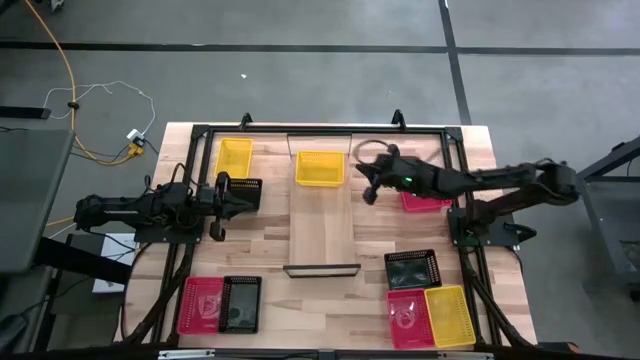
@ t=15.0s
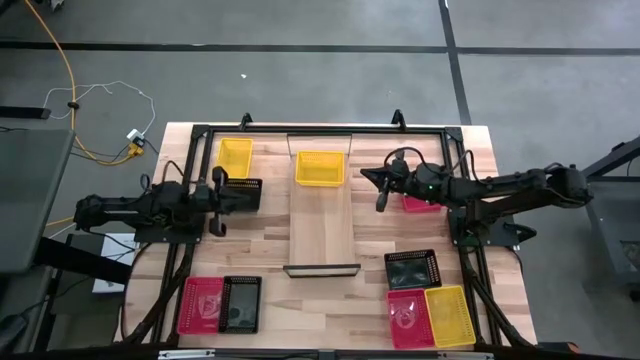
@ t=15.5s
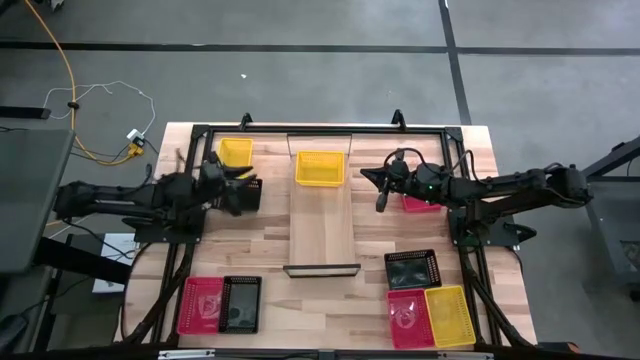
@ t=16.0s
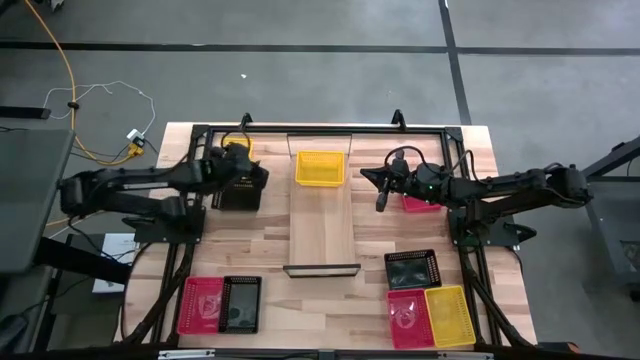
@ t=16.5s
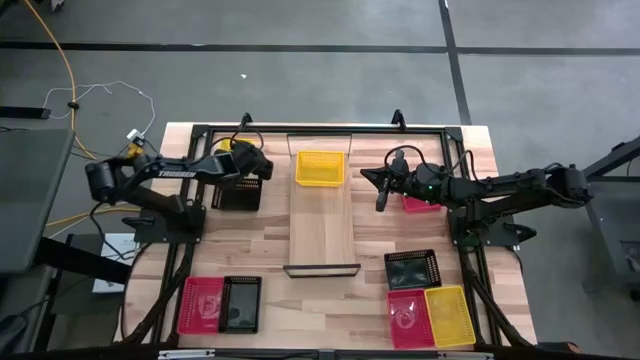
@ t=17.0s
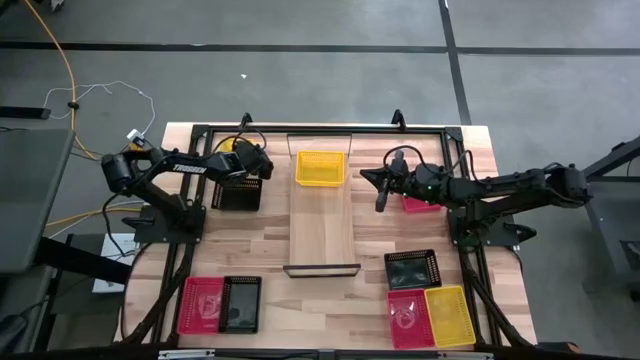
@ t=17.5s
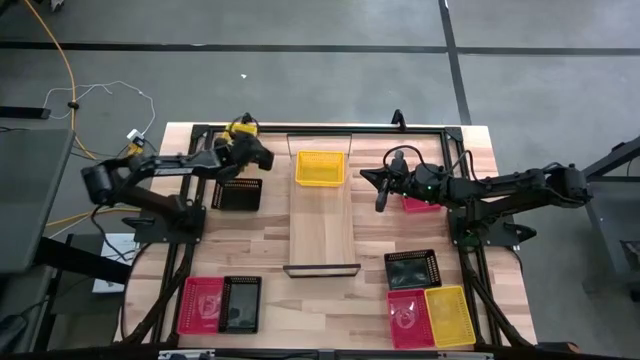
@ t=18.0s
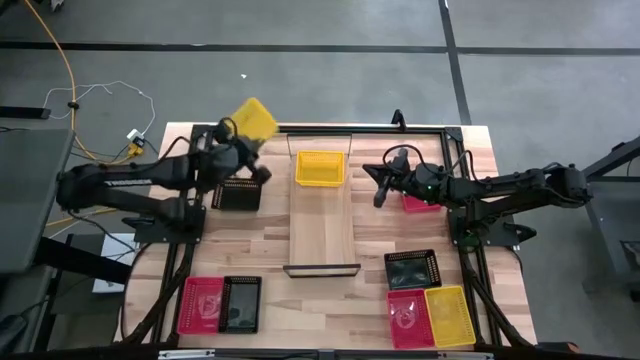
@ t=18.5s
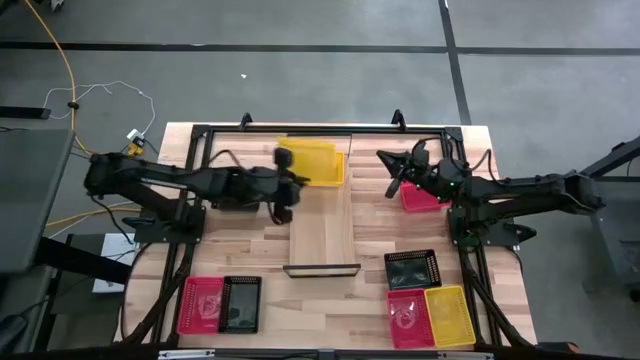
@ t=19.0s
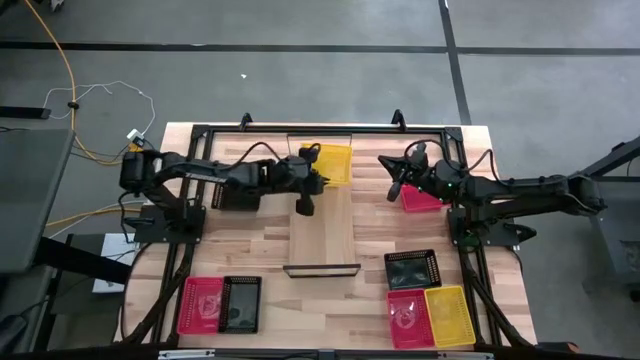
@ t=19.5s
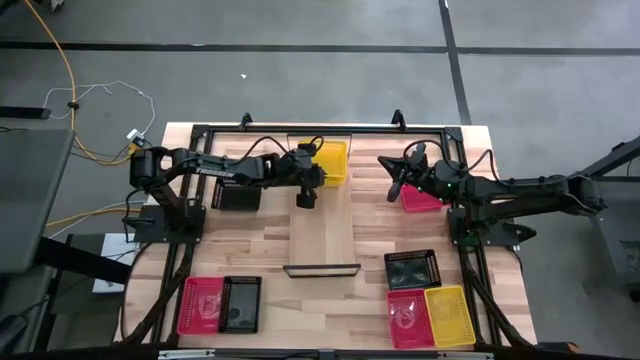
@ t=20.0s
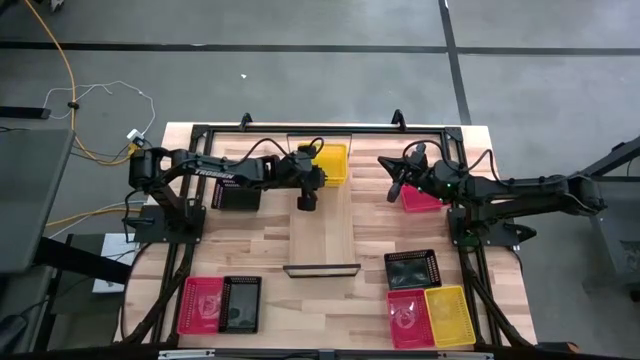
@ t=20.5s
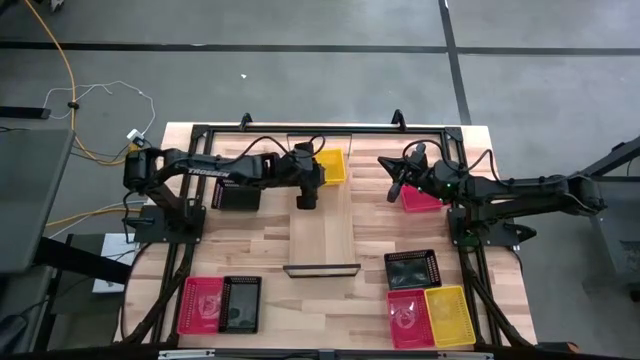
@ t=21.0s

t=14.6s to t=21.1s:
Task: Stack baskets on shelf by color
Stack the top yellow bin on the yellow bin on the shelf

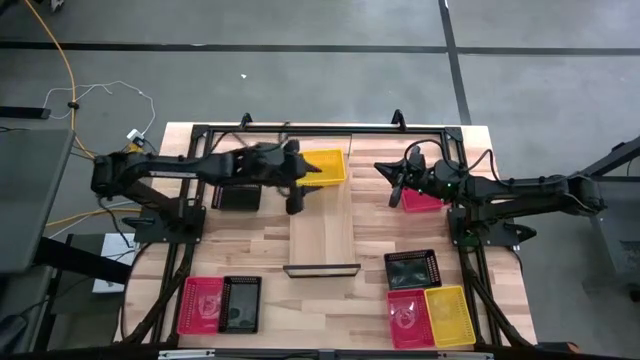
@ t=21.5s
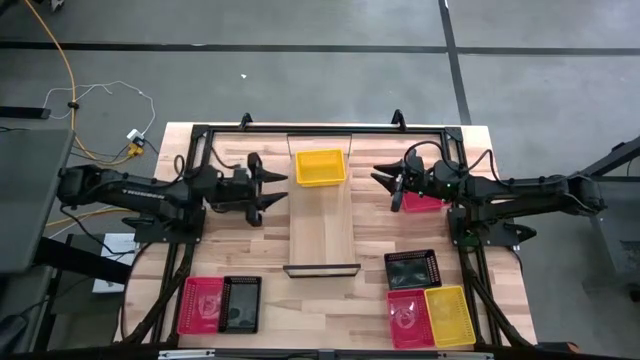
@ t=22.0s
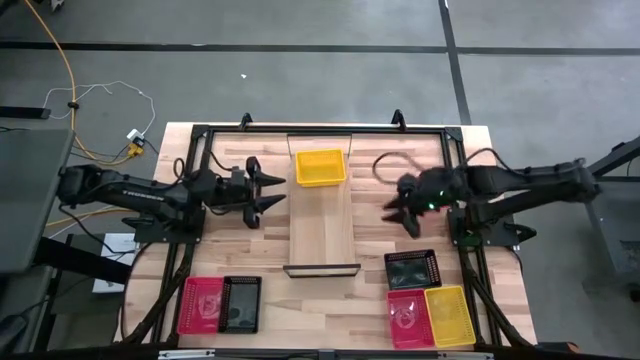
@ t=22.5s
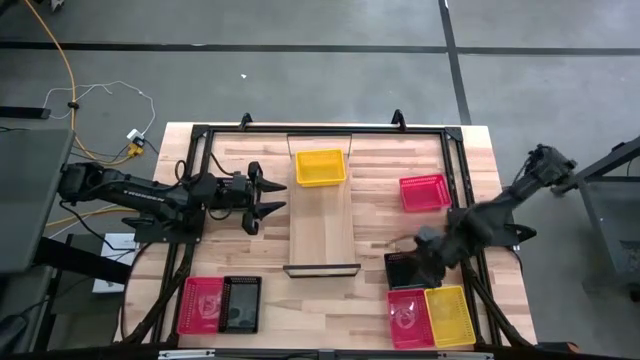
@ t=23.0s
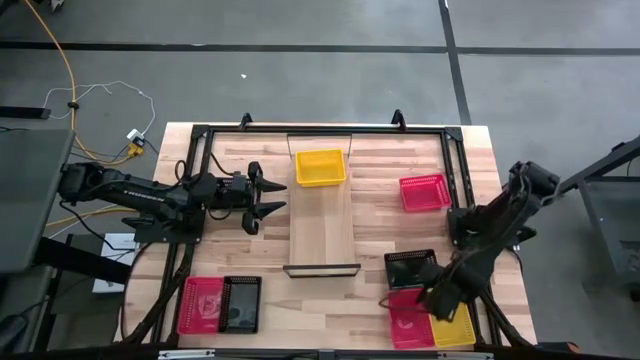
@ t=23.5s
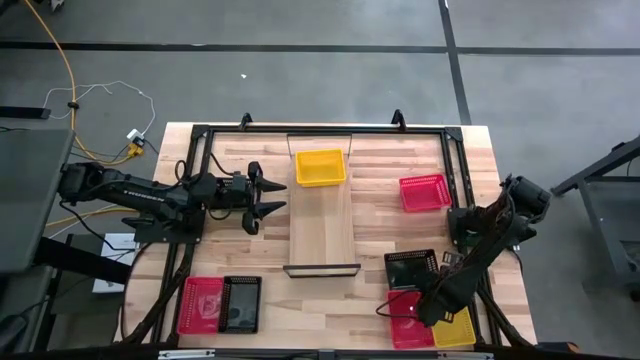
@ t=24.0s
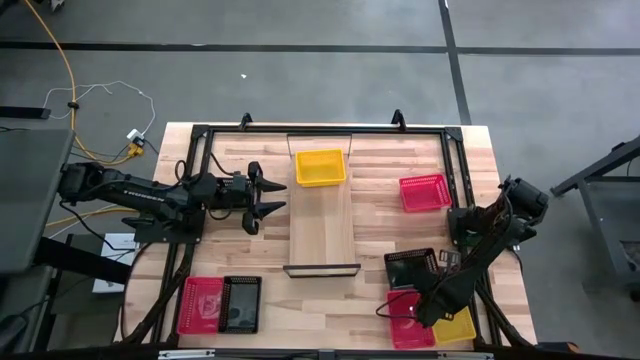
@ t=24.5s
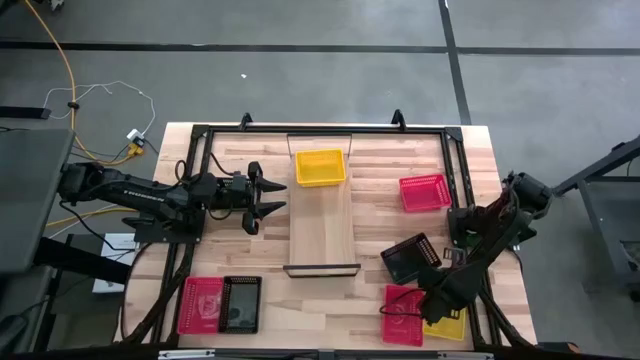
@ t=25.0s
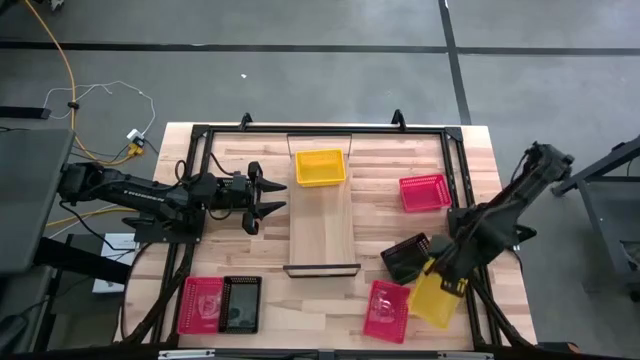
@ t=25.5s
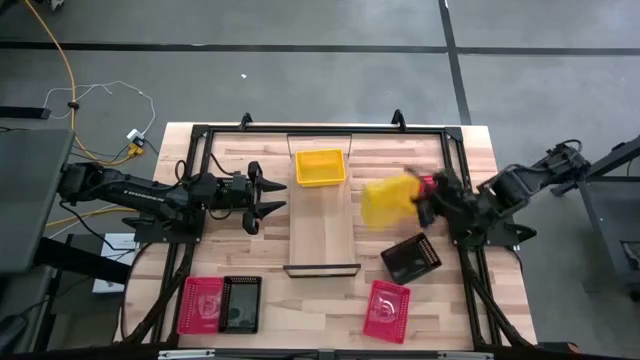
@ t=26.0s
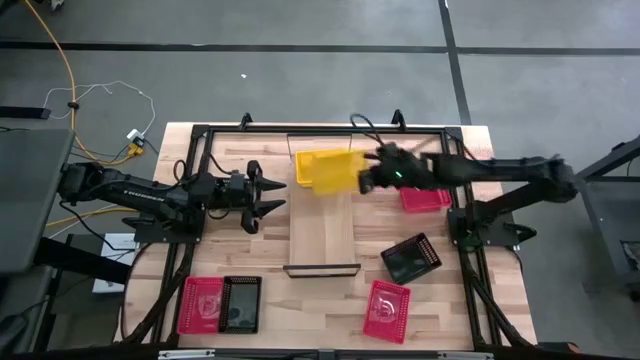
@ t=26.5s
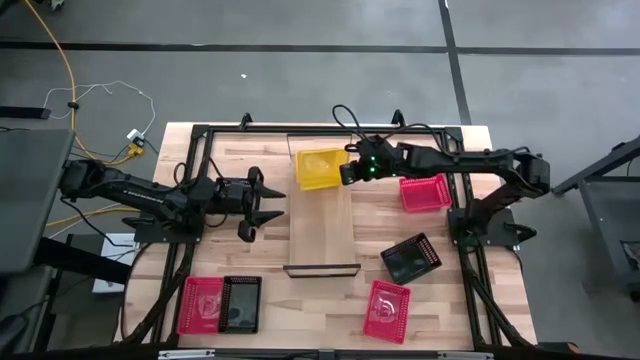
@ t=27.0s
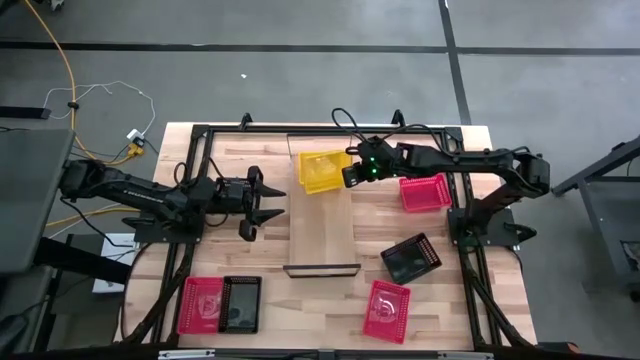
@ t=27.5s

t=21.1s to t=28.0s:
Stack the yellow bin on the yellow bin on the shelf

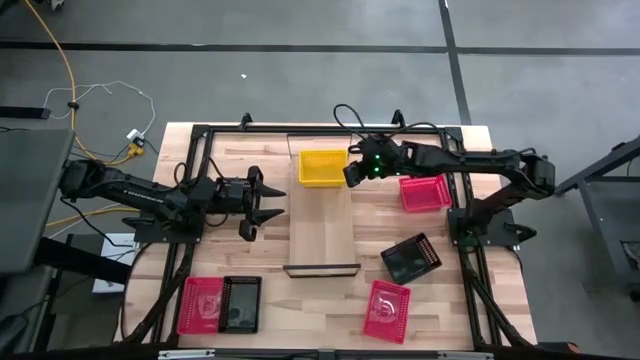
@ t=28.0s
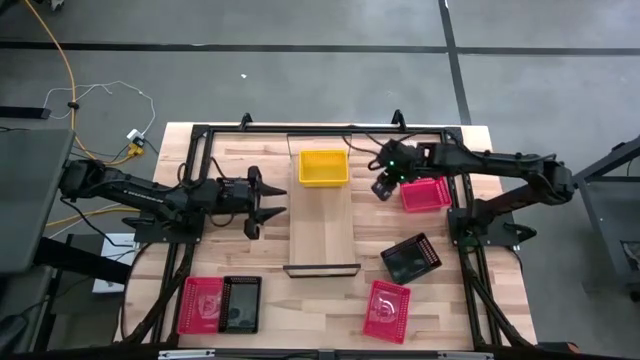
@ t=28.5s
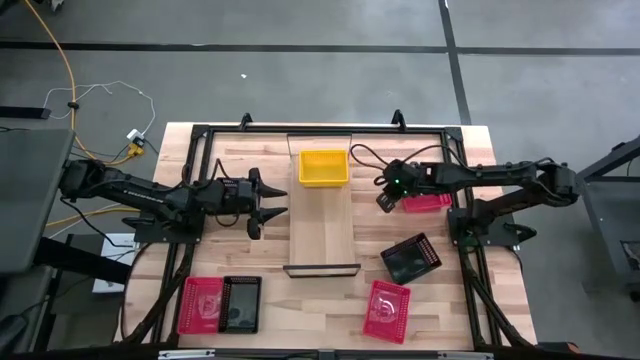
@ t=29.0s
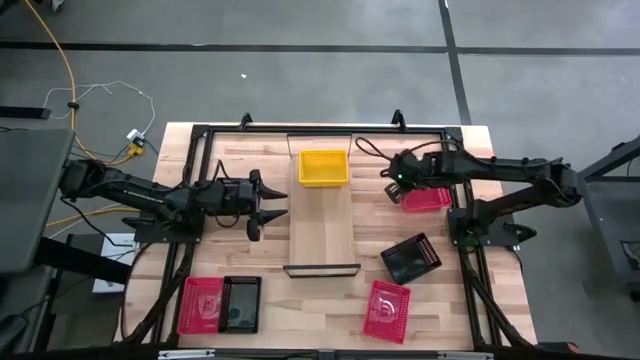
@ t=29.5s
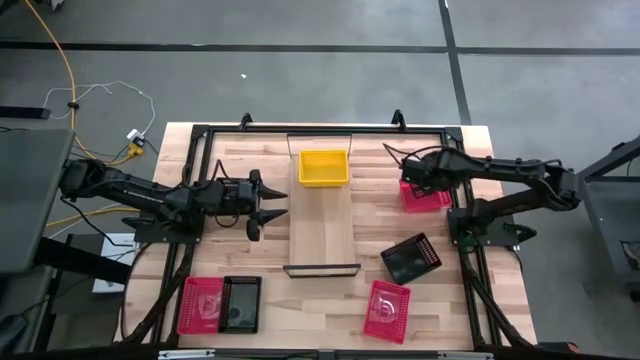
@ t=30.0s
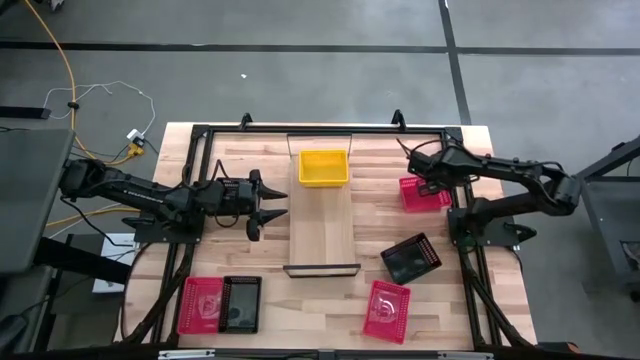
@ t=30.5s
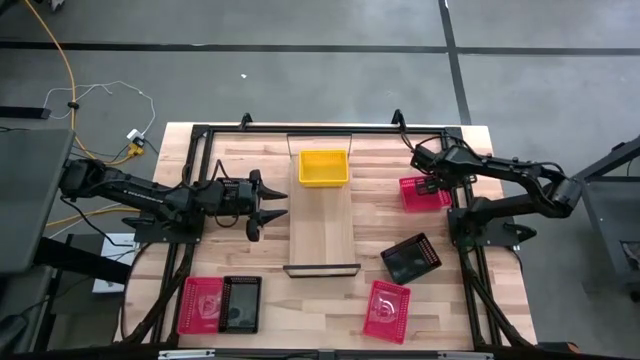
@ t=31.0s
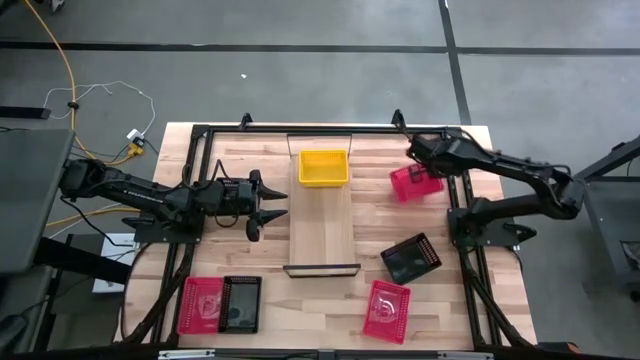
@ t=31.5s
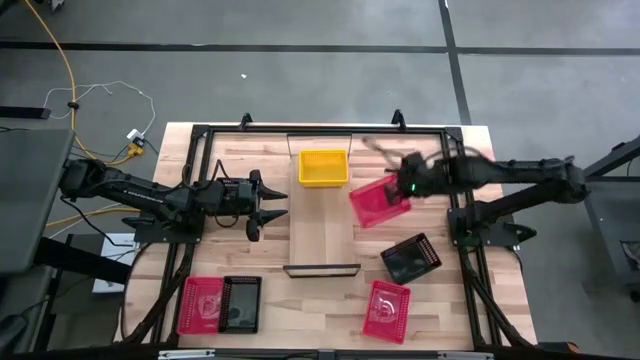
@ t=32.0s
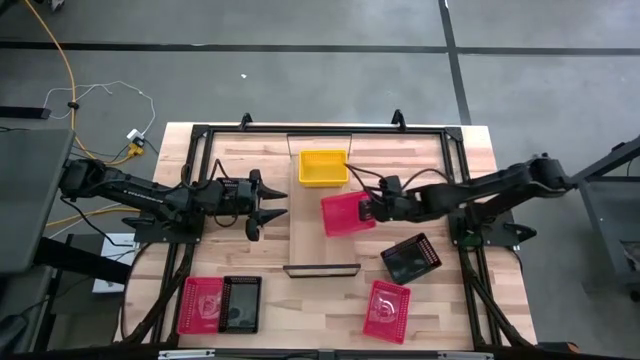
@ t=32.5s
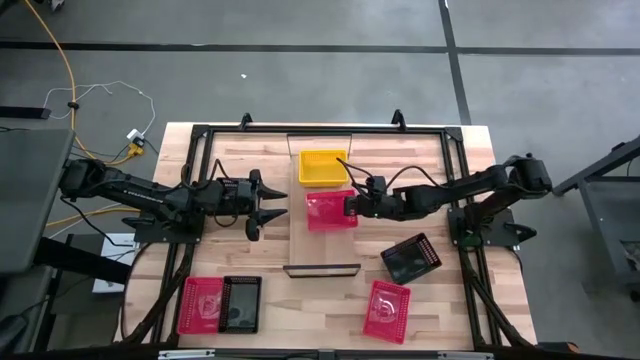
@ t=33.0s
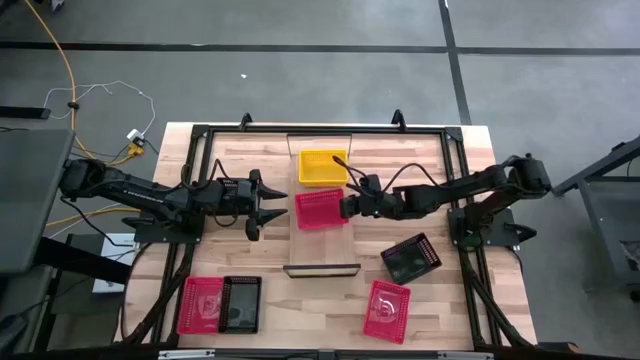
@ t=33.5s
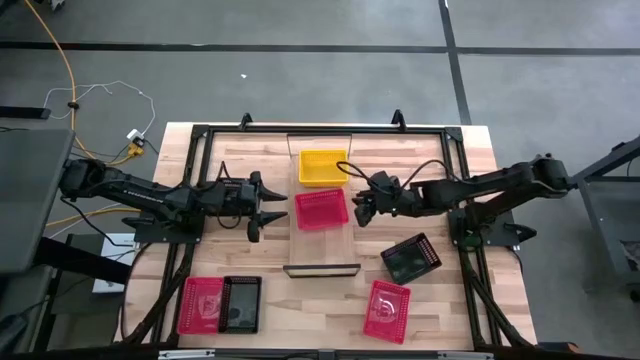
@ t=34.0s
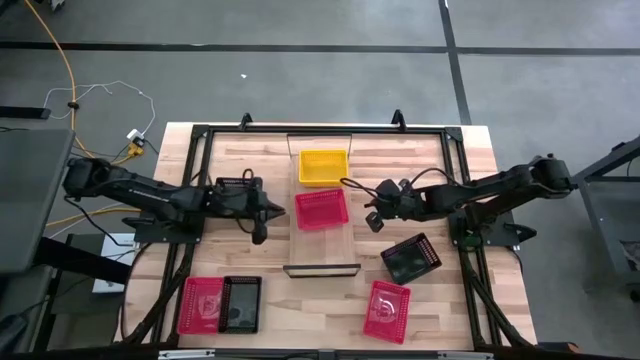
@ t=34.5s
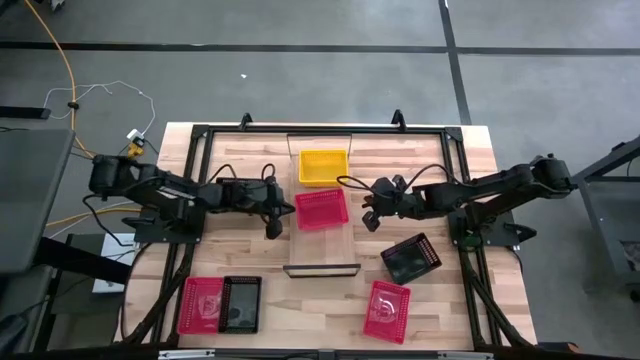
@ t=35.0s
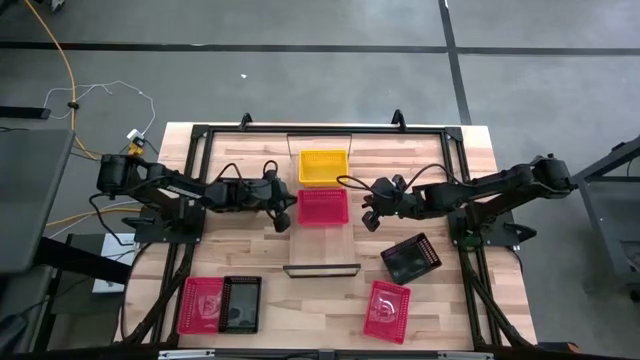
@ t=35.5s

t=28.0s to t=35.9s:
Put the top red bin on the shelf
